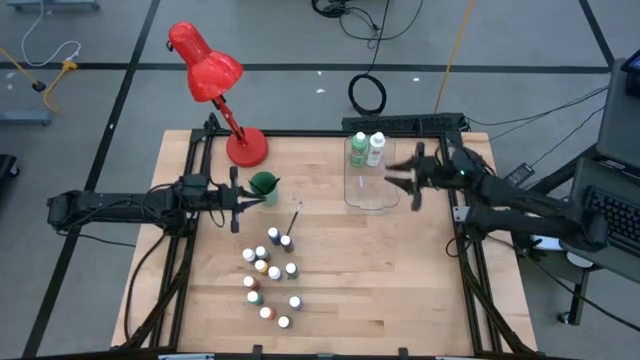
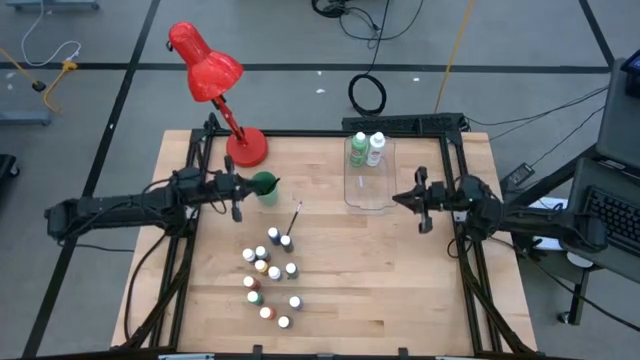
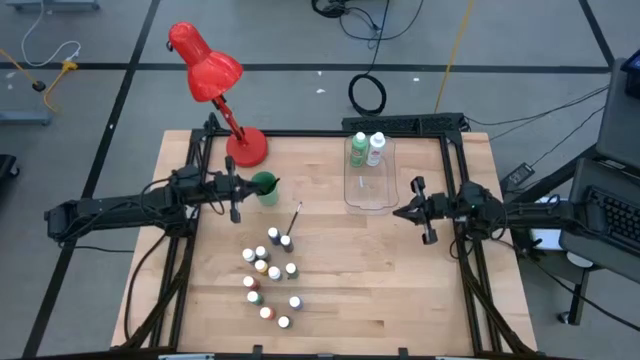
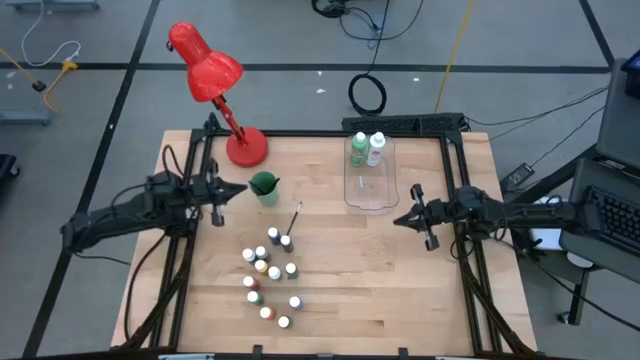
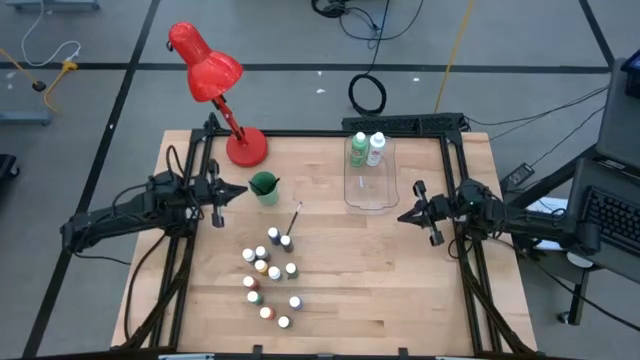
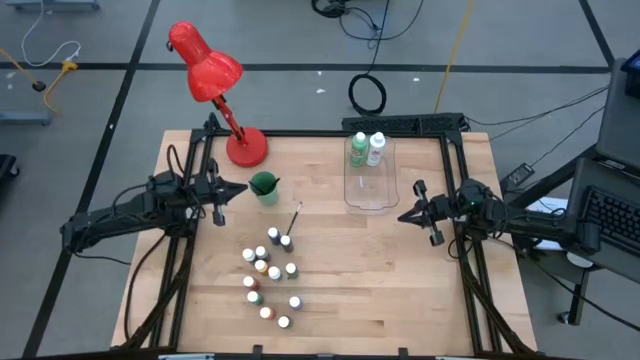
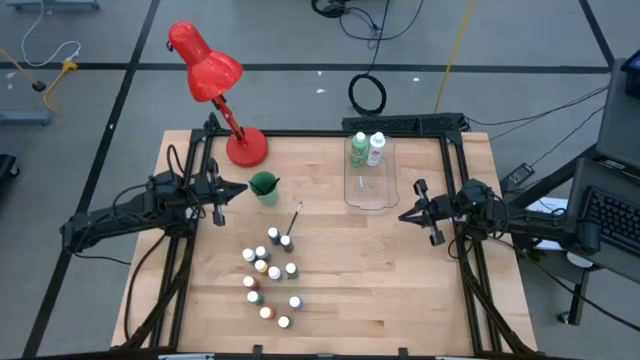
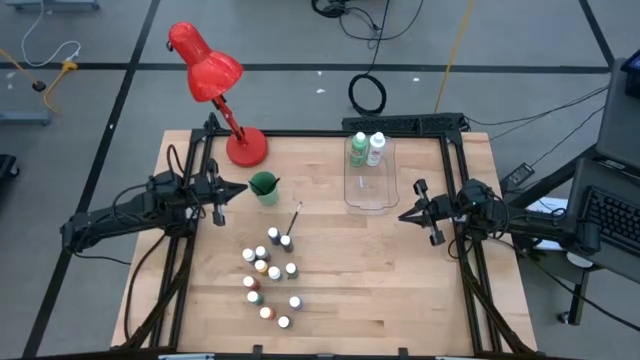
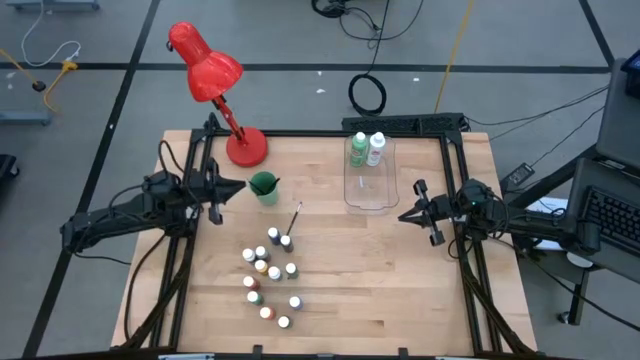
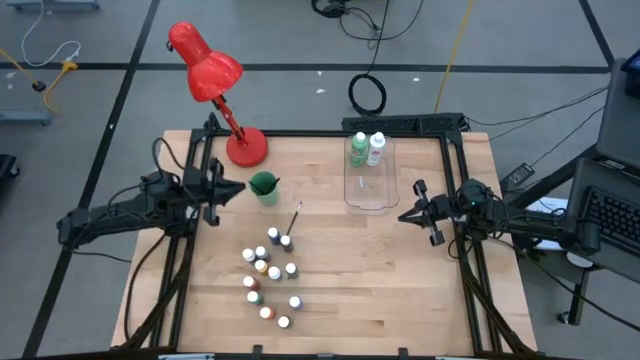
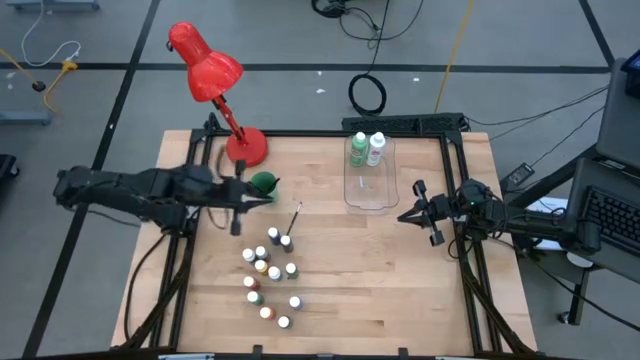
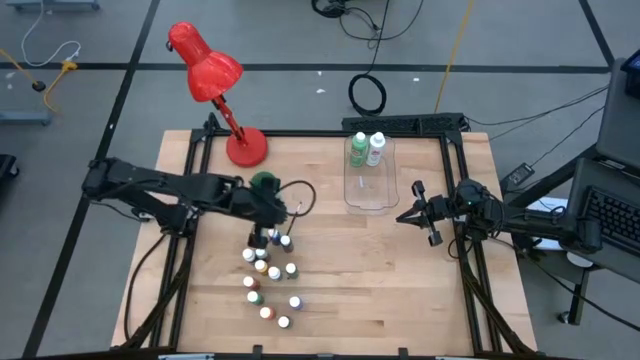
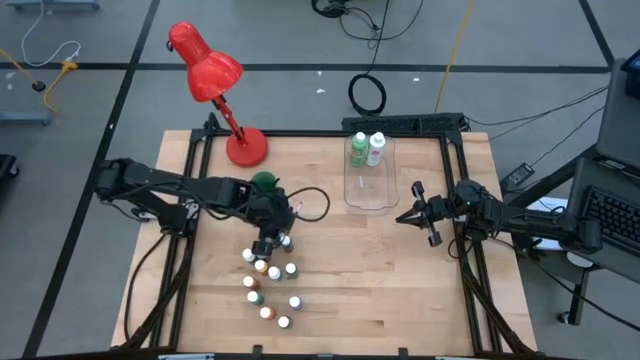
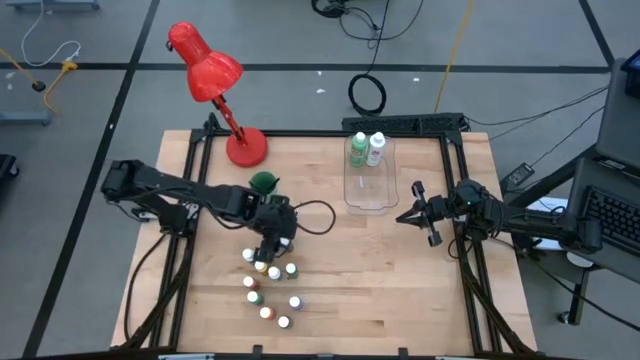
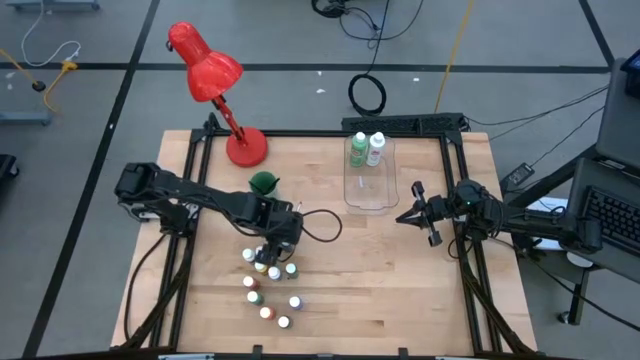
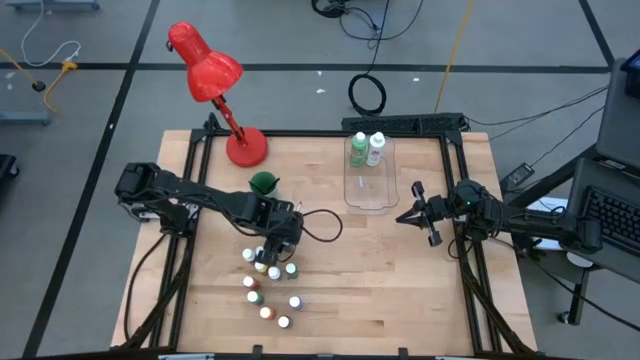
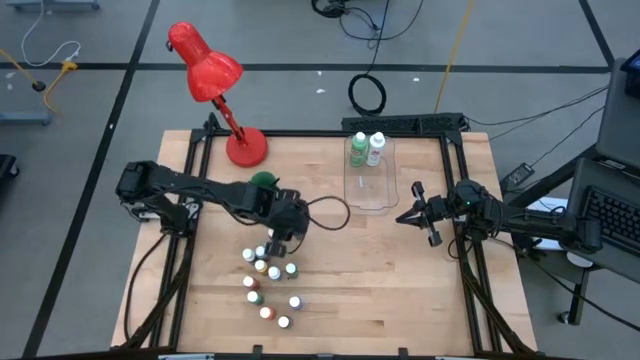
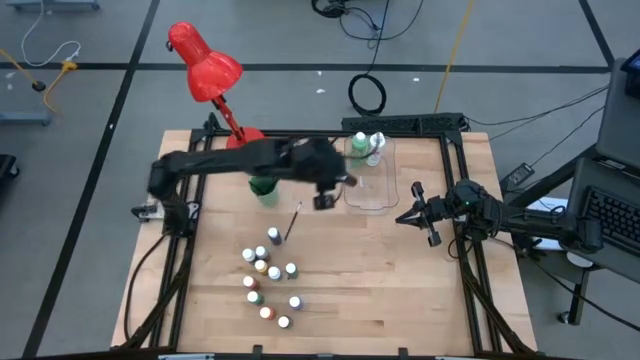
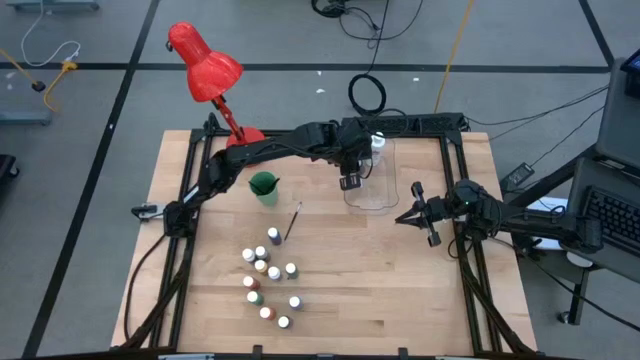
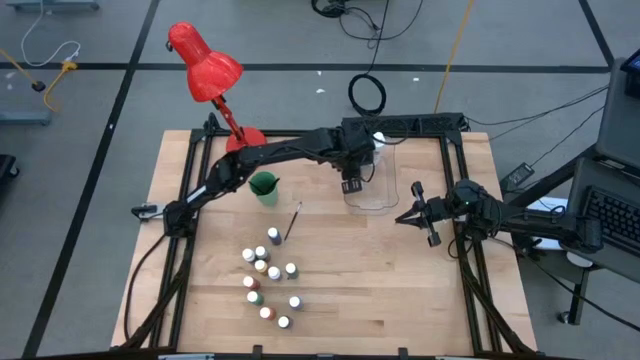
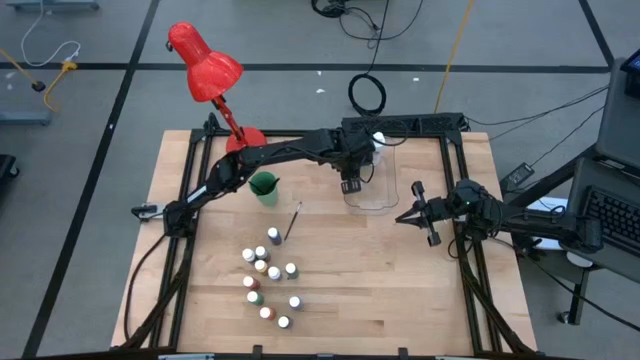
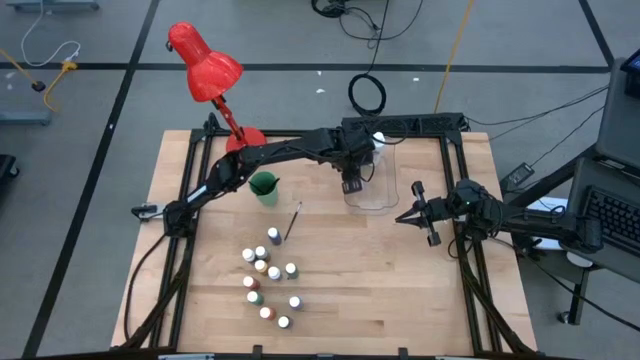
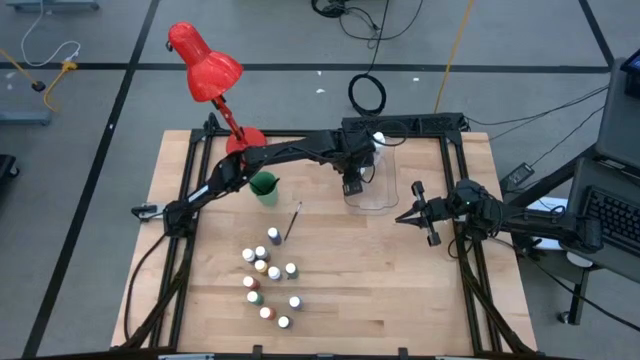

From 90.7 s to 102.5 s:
Task: Pick & Place Paint Supplies
Put the small black paint bottle into the transparent bin

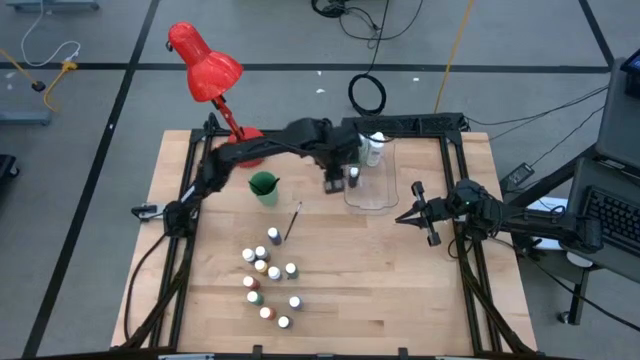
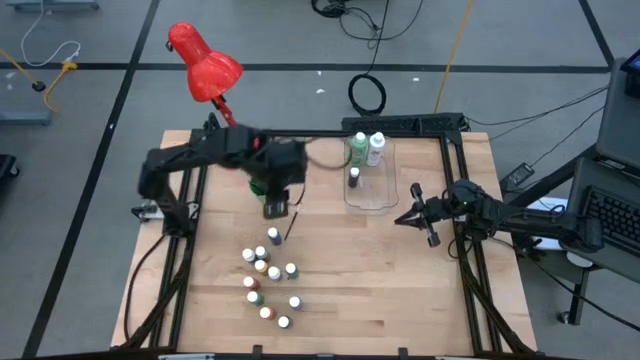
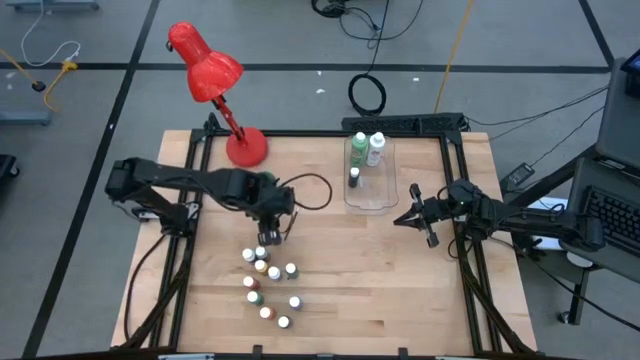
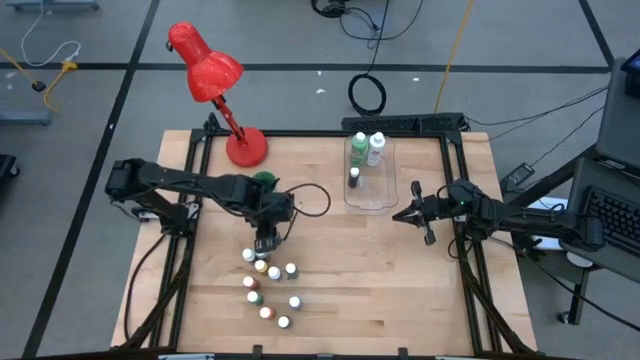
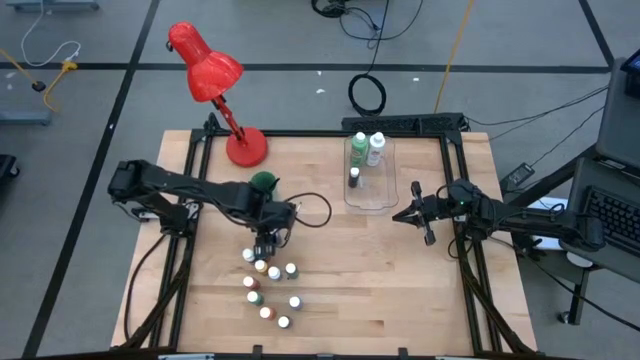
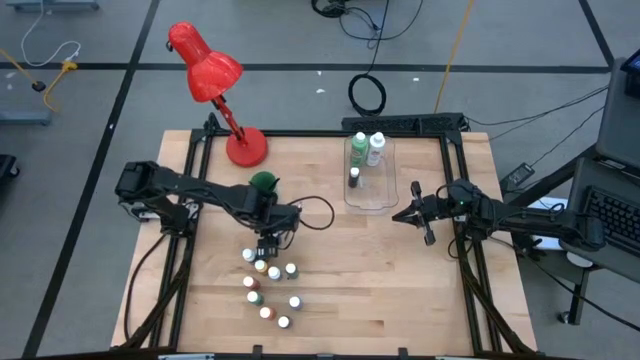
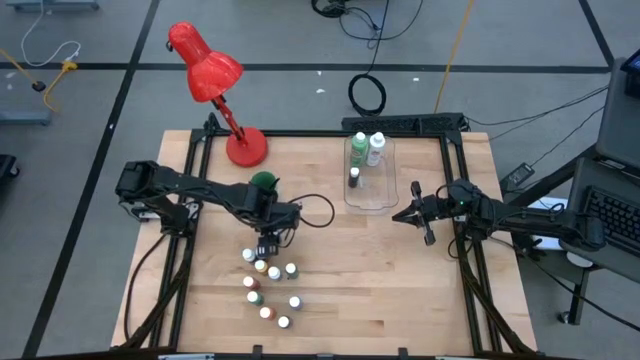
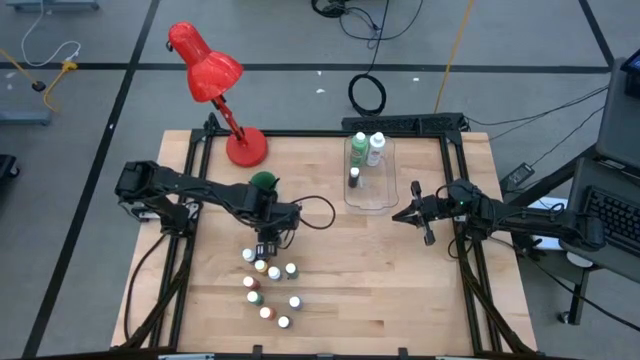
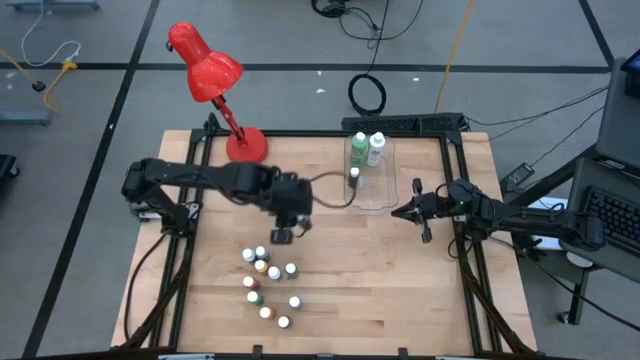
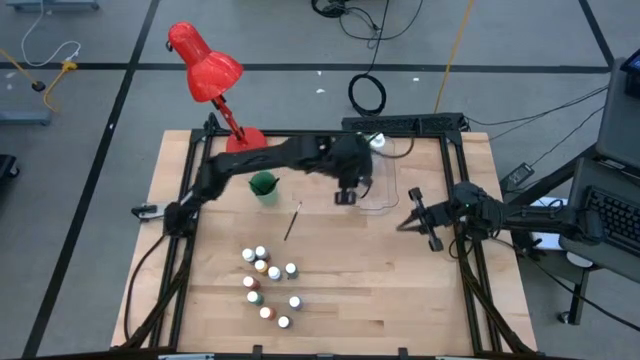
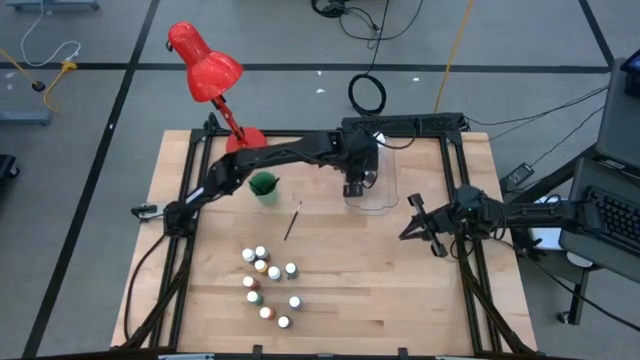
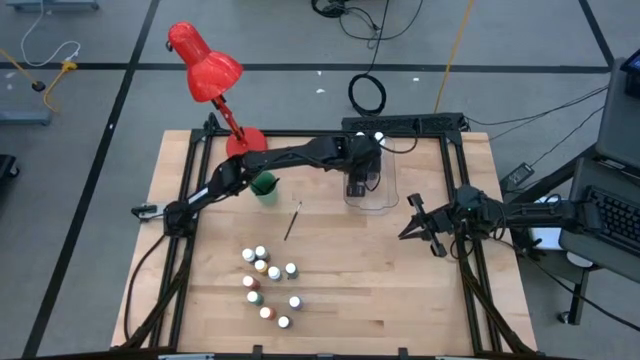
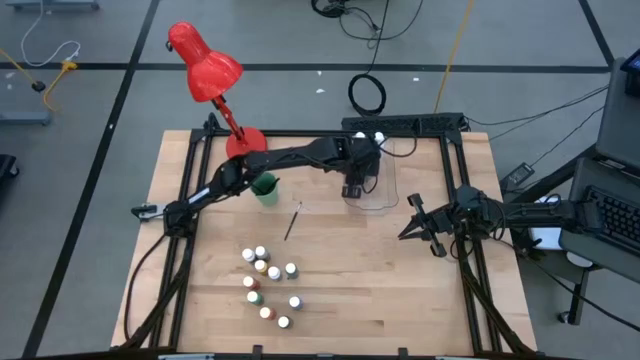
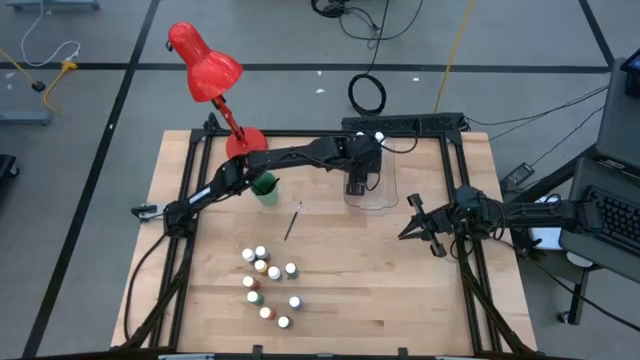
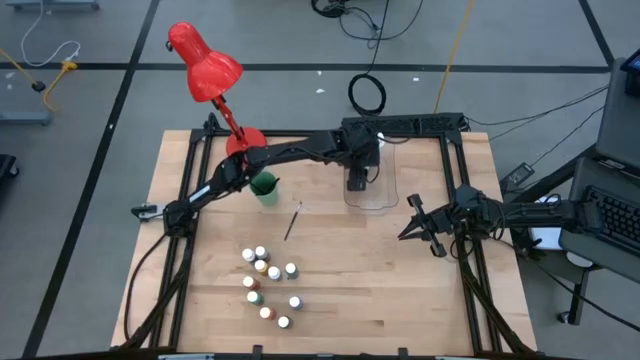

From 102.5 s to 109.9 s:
Put the small blue paint bottle into the transparent bin

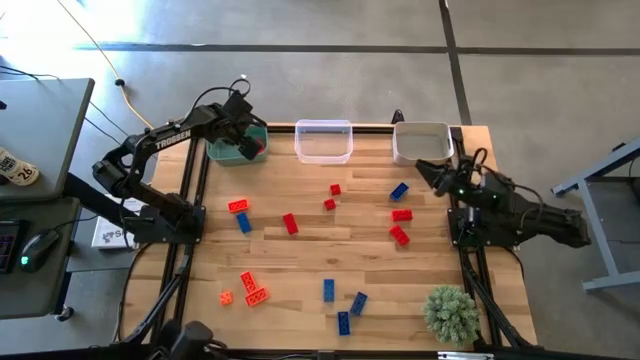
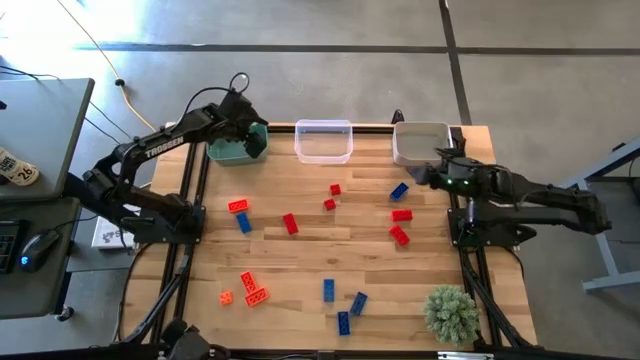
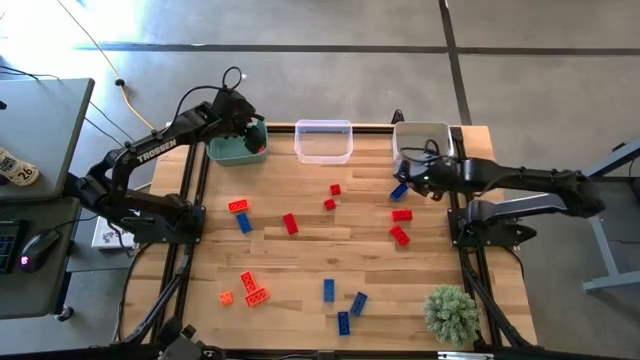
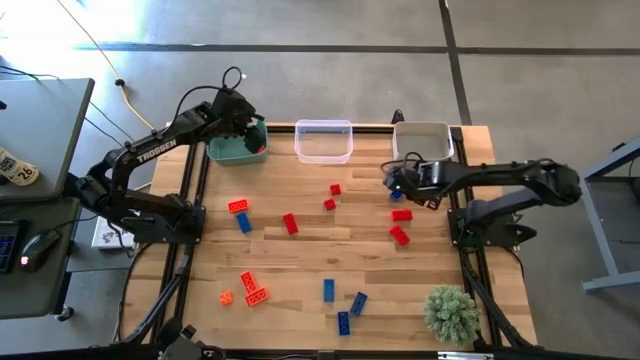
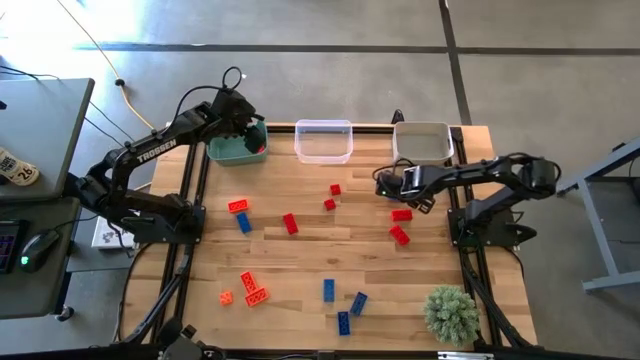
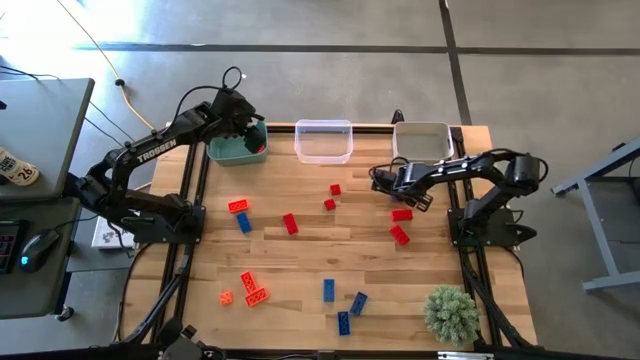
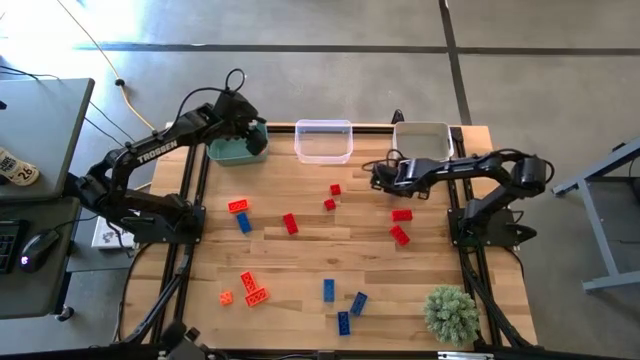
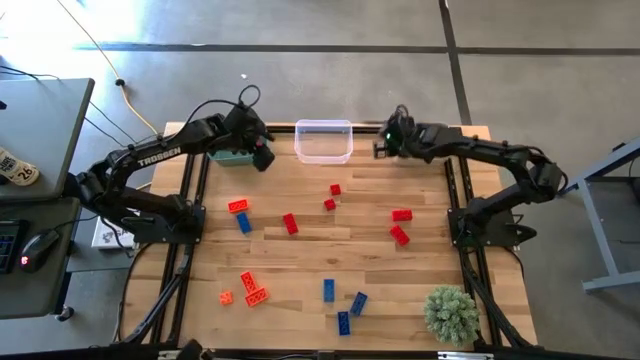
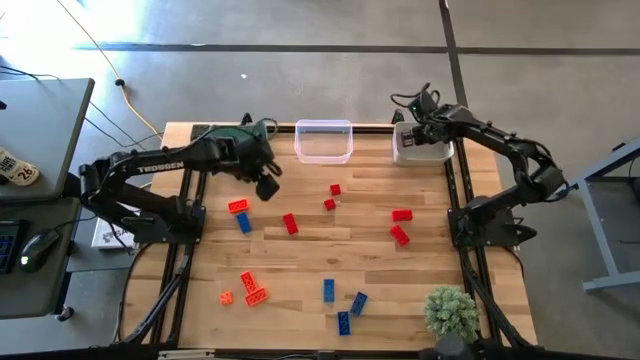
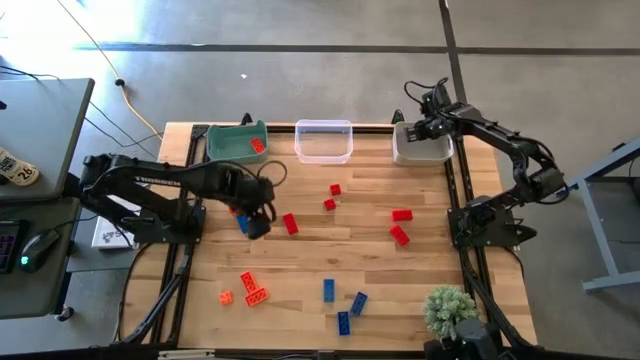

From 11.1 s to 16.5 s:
Task: Sort & place blocks by color
Put the blue game piece into the white bin
